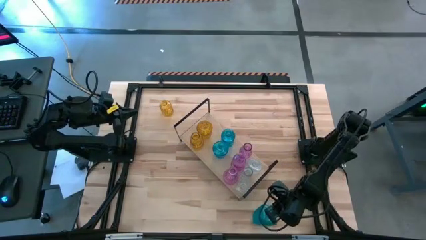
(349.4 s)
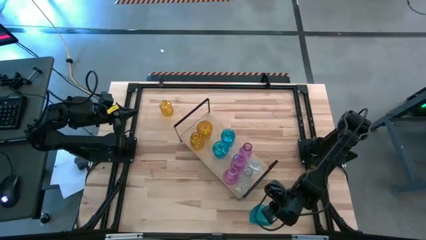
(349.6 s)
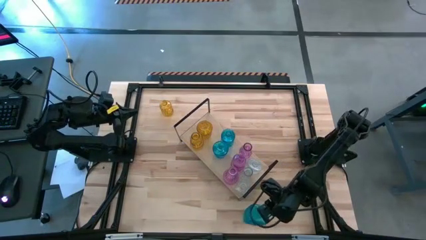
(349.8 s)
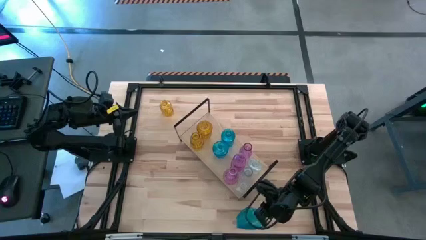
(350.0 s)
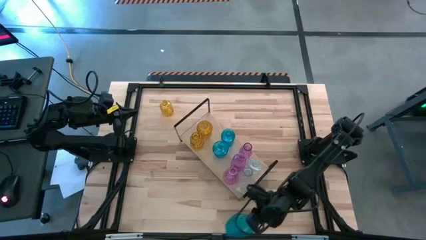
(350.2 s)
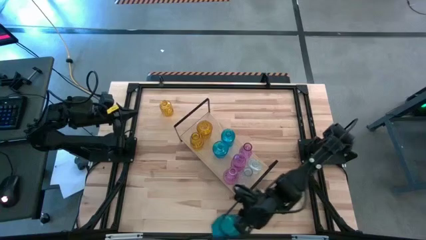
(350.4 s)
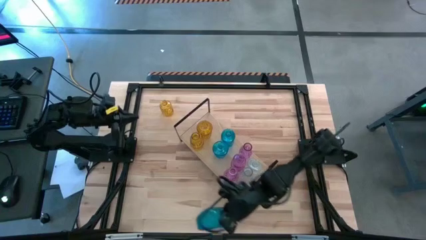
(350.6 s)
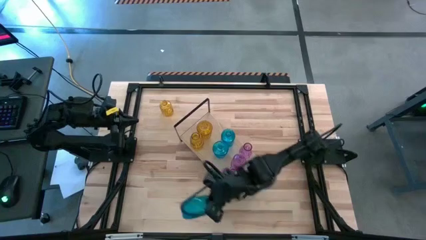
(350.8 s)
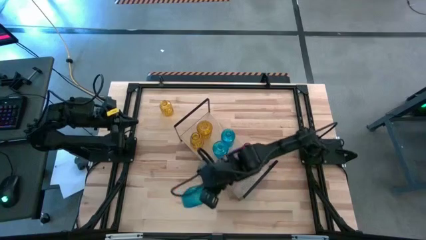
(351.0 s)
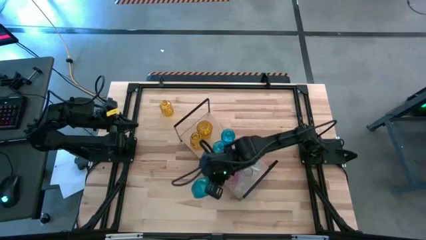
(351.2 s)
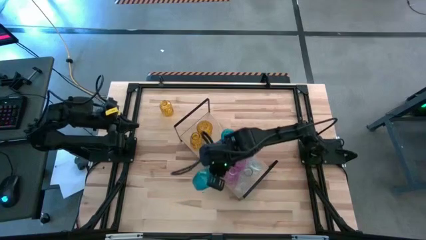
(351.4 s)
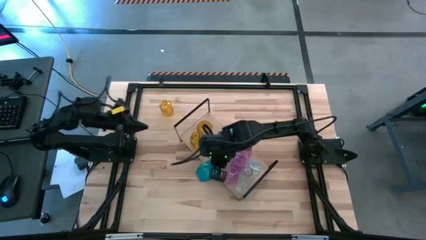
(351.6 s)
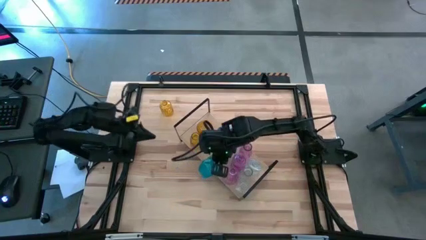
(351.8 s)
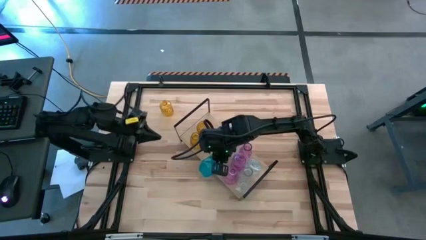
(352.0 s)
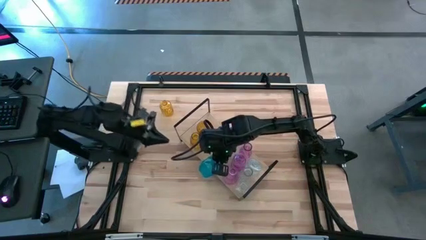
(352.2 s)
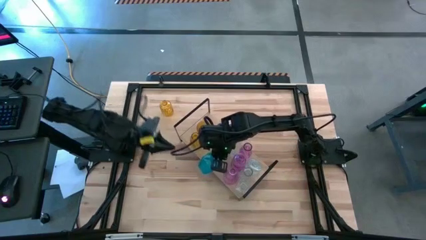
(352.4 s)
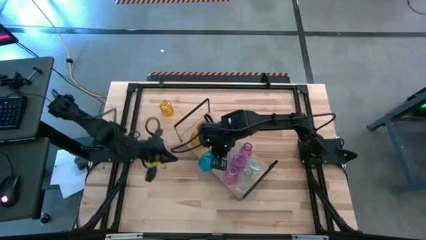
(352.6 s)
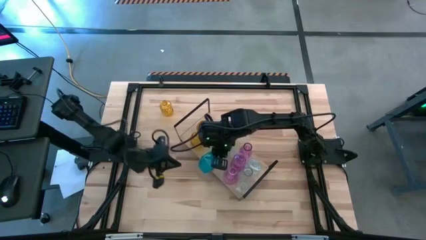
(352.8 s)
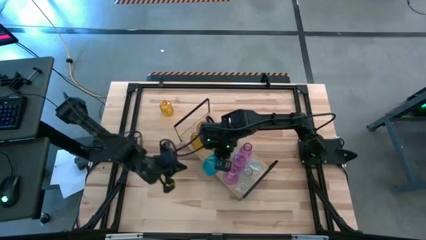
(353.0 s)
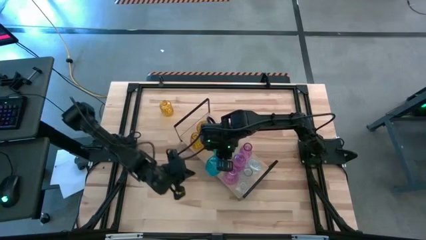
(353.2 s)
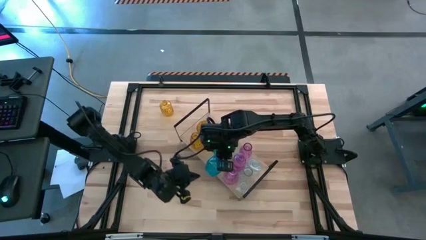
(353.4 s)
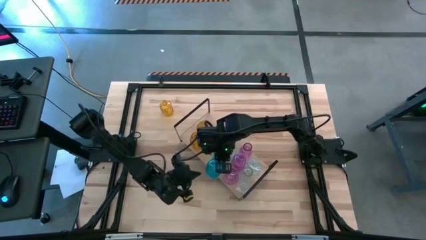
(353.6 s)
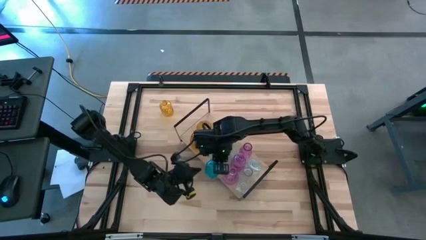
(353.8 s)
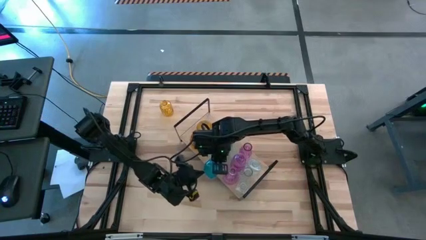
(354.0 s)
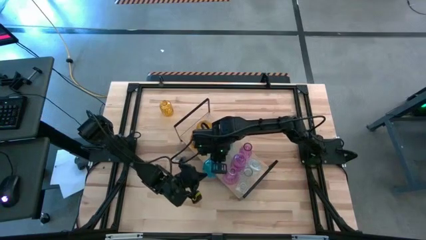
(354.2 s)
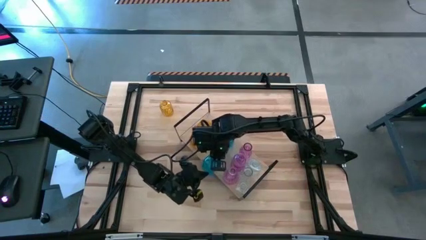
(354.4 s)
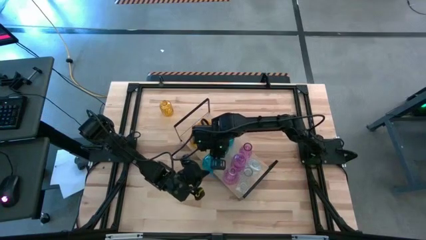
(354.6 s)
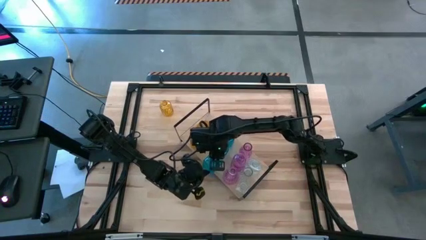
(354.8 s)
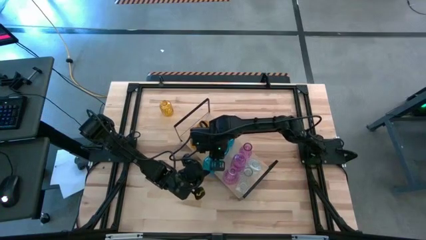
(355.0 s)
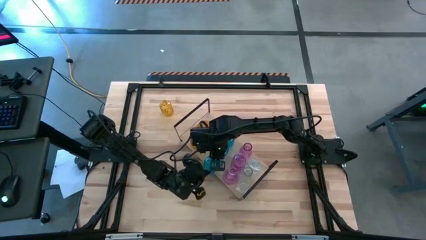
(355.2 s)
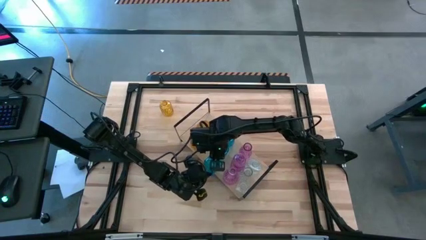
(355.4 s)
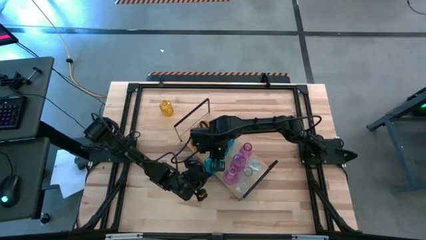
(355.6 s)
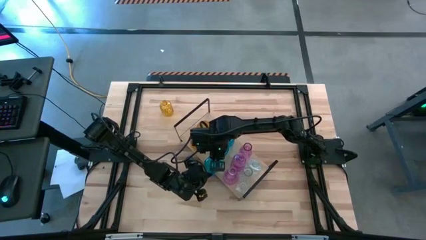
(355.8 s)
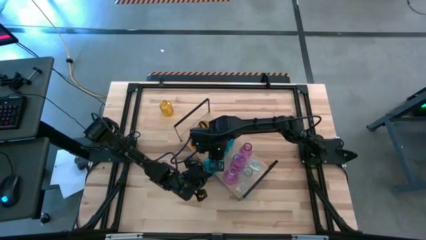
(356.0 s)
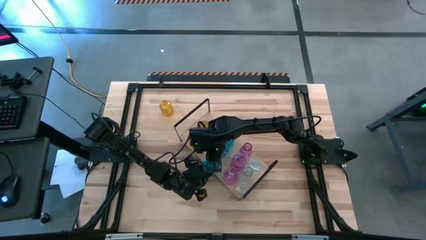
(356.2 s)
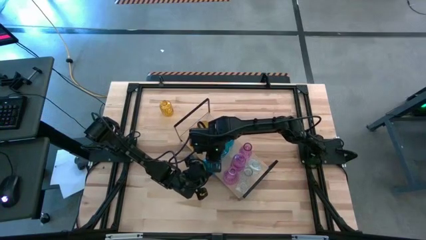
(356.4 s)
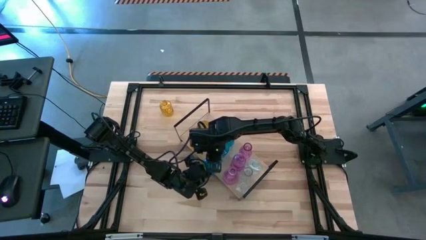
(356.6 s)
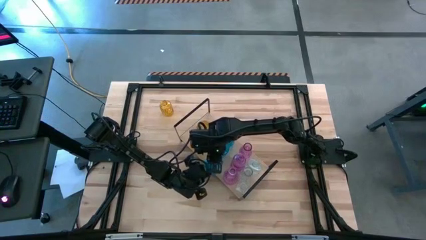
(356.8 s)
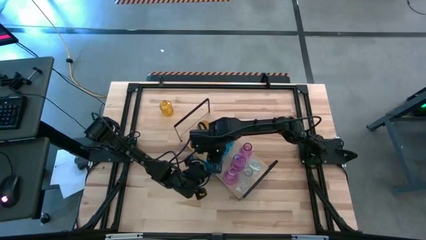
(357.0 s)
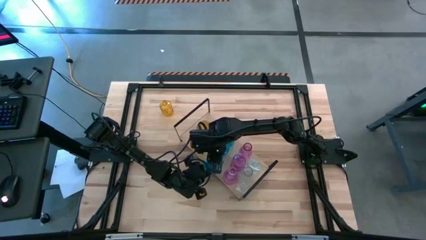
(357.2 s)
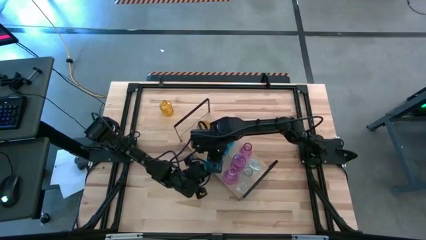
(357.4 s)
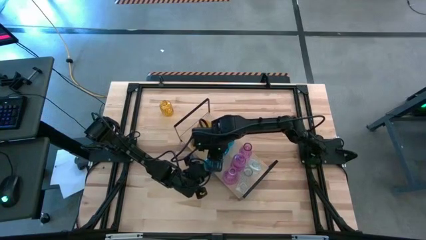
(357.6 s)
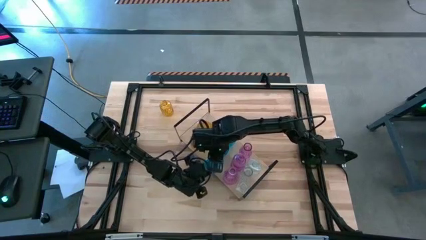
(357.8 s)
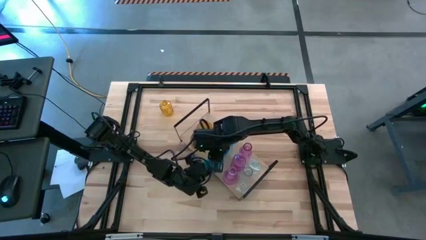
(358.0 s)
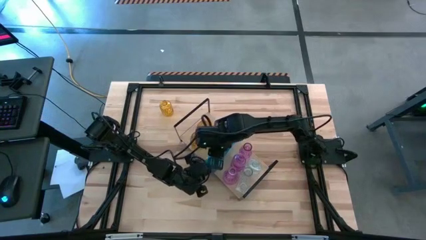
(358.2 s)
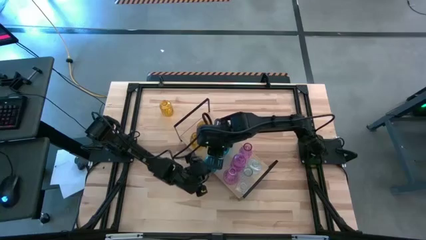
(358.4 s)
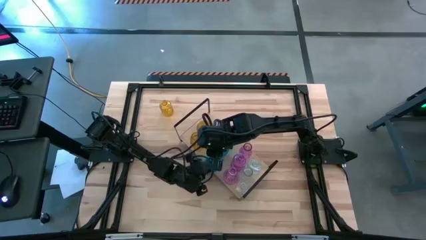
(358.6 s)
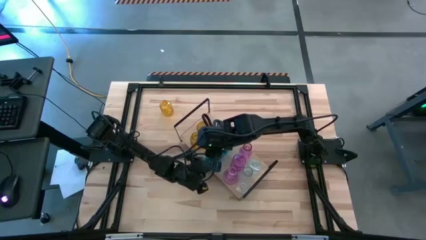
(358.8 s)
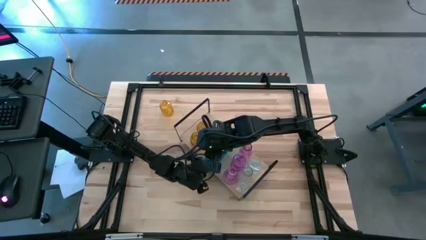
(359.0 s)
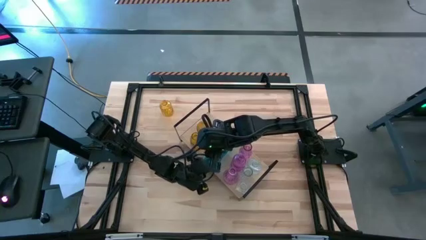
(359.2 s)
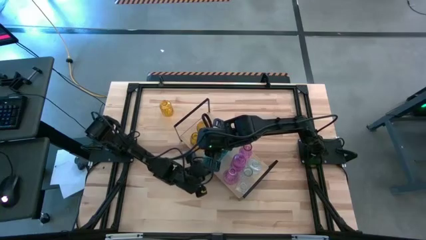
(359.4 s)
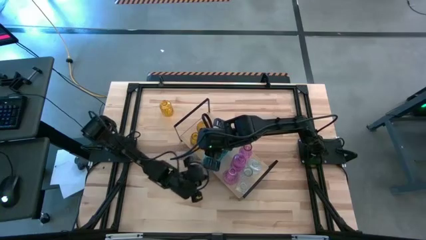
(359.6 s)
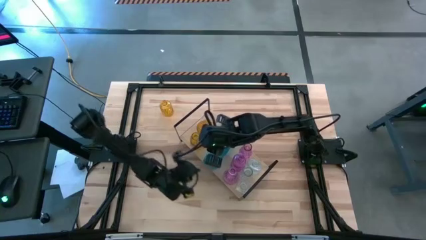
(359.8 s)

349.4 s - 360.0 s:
Task: sort vases onto shelf
Put the blue crystal vase on the shelf
